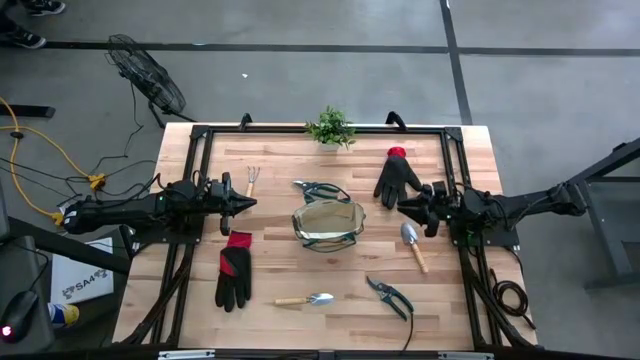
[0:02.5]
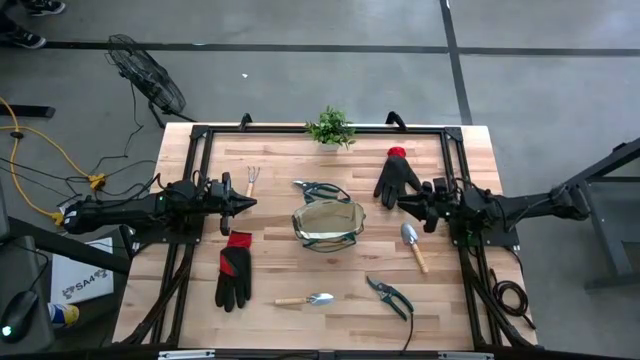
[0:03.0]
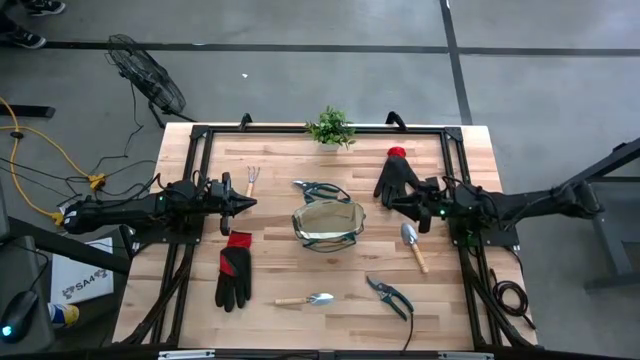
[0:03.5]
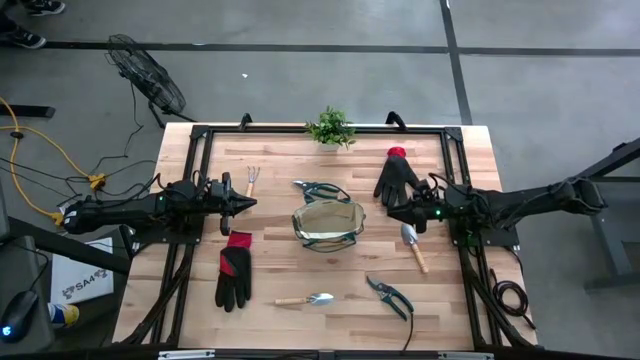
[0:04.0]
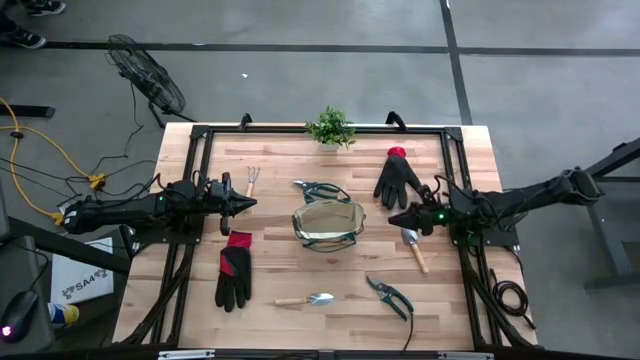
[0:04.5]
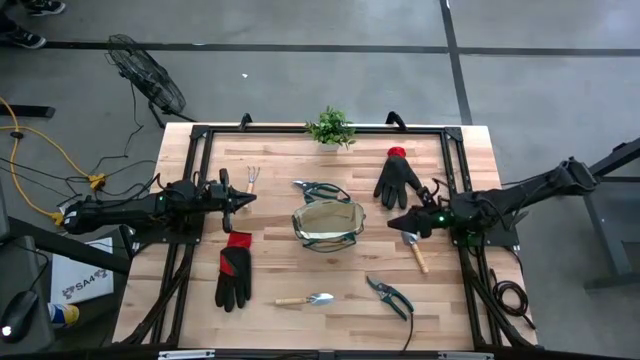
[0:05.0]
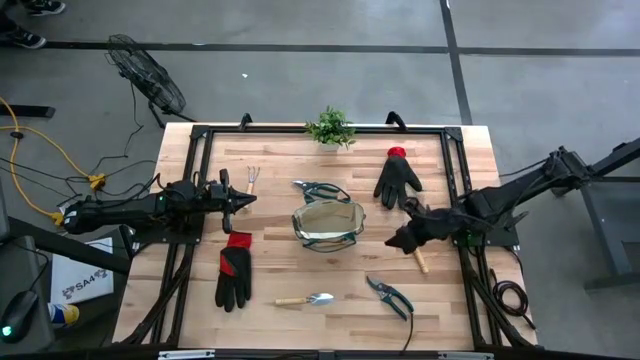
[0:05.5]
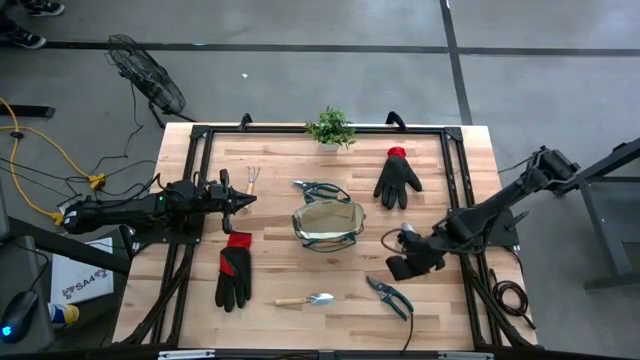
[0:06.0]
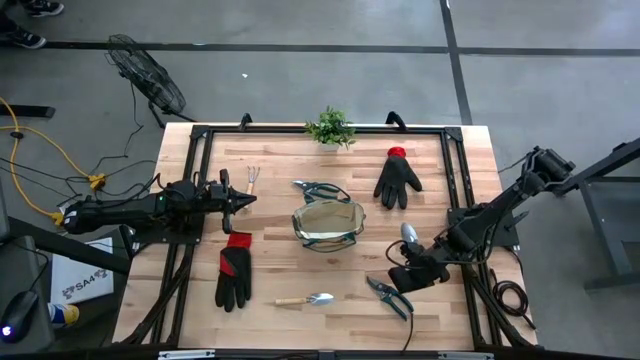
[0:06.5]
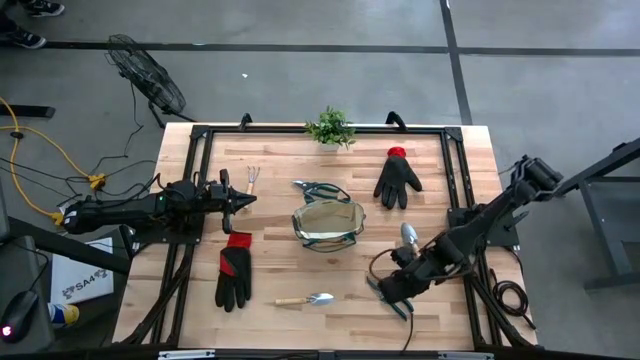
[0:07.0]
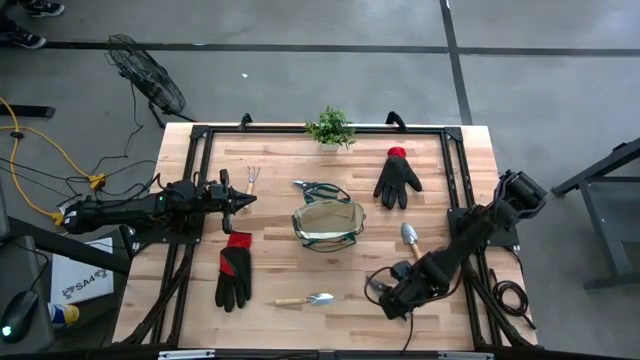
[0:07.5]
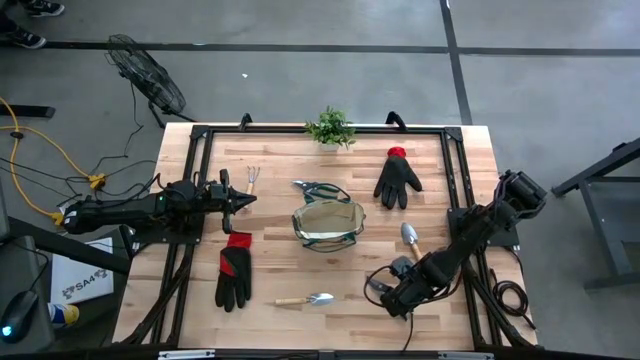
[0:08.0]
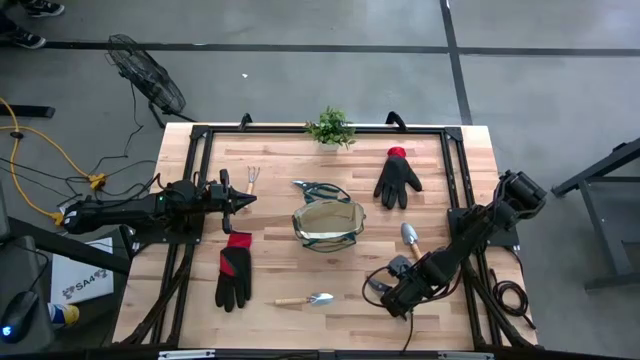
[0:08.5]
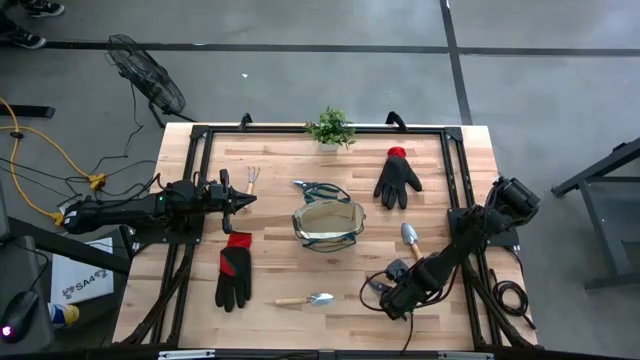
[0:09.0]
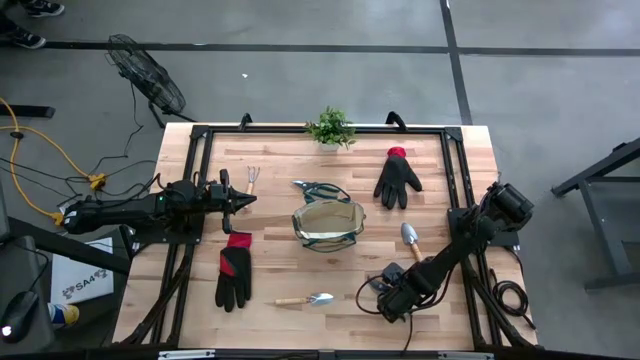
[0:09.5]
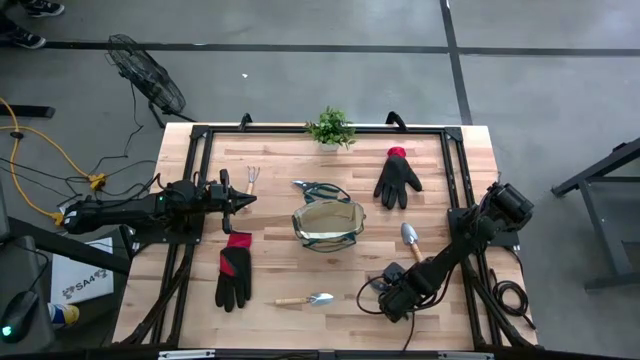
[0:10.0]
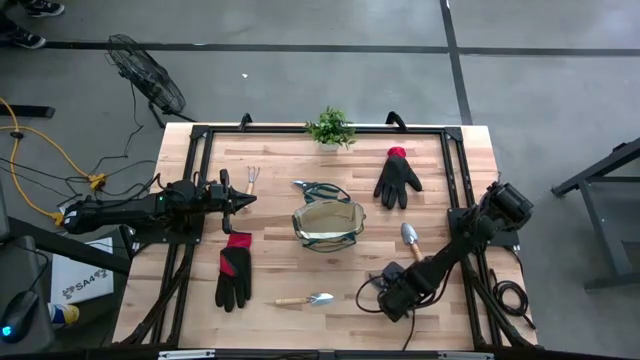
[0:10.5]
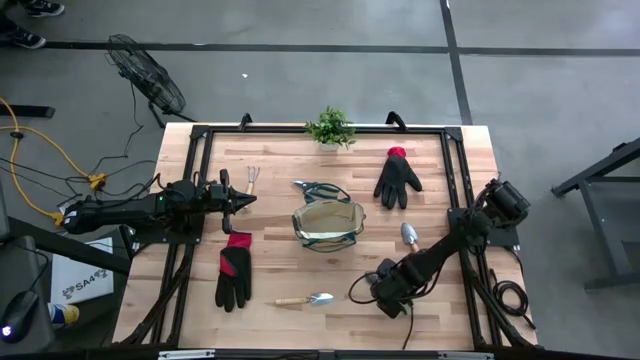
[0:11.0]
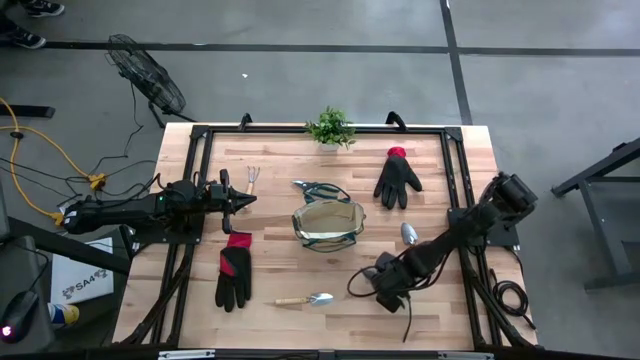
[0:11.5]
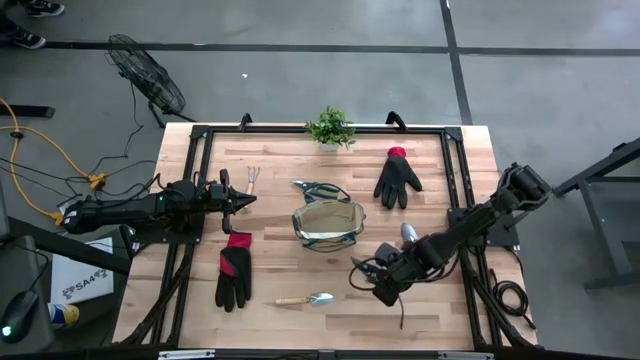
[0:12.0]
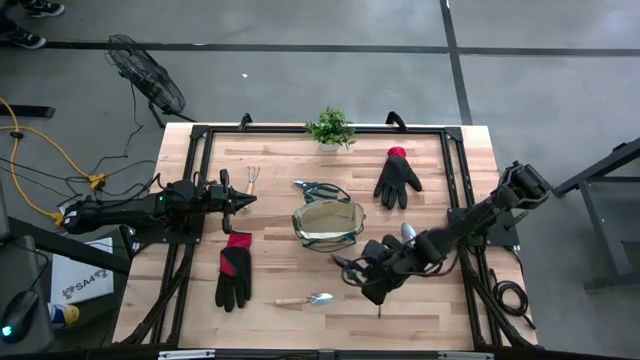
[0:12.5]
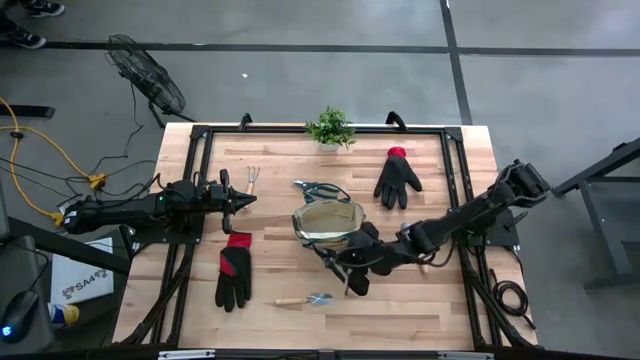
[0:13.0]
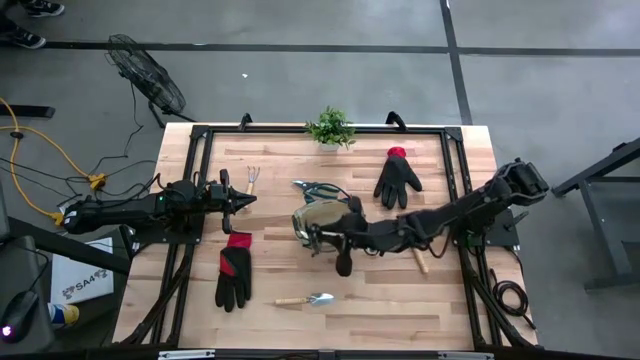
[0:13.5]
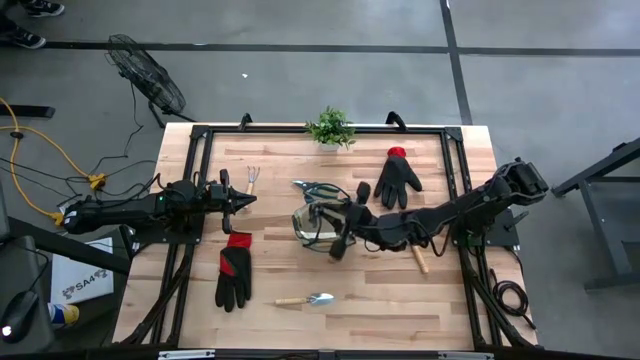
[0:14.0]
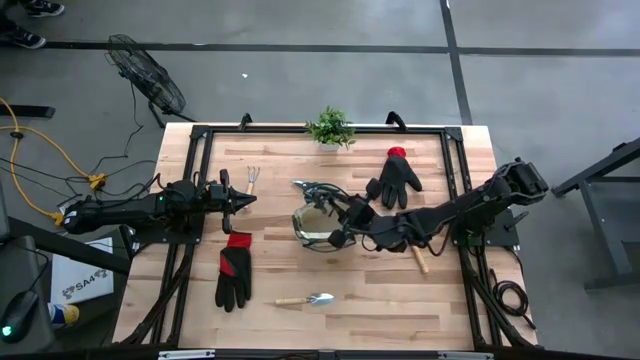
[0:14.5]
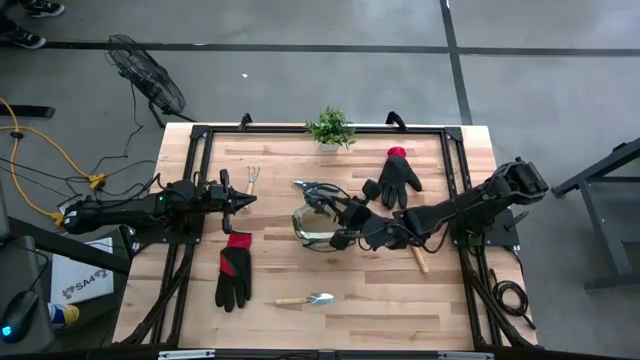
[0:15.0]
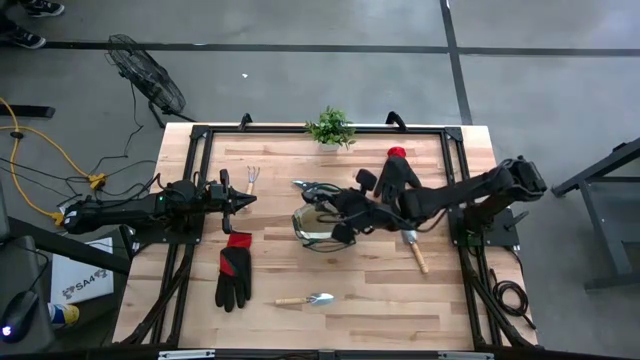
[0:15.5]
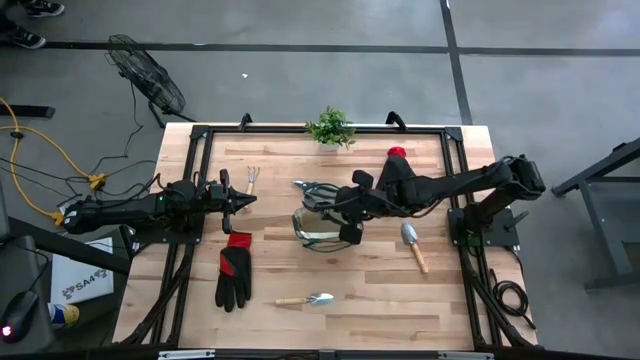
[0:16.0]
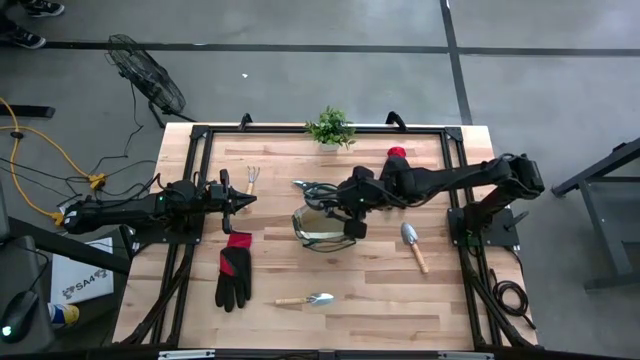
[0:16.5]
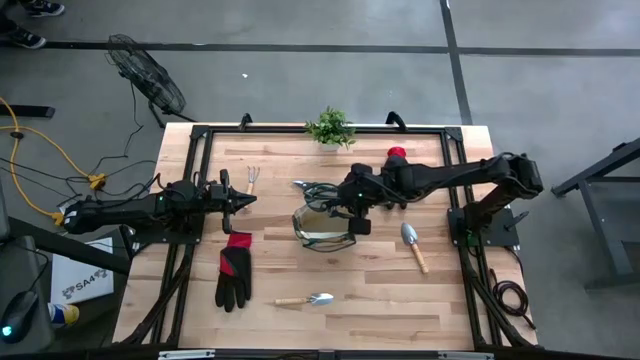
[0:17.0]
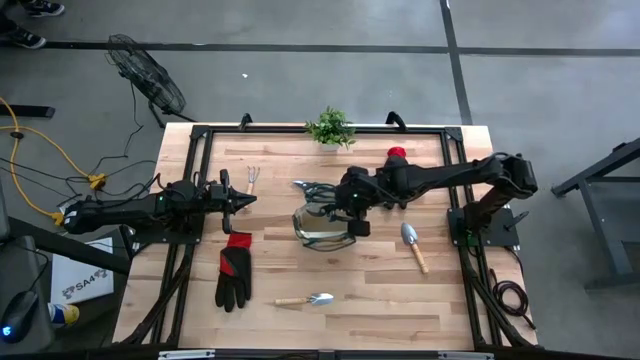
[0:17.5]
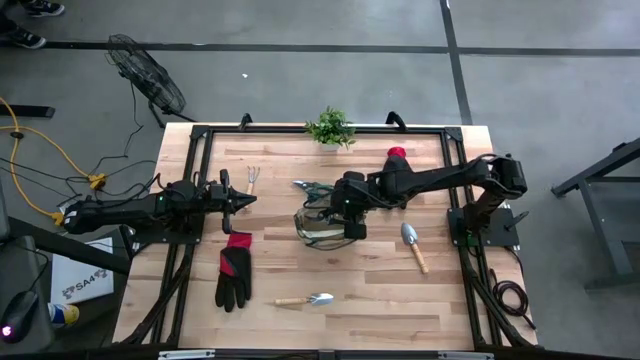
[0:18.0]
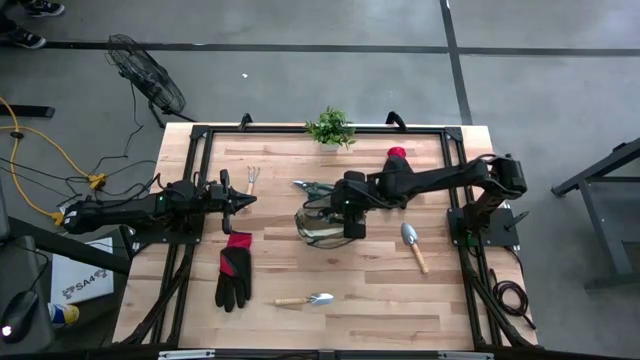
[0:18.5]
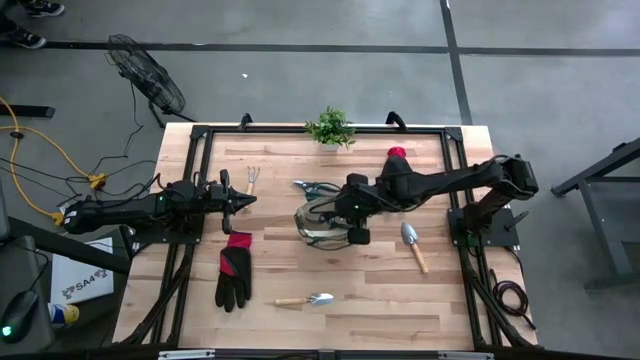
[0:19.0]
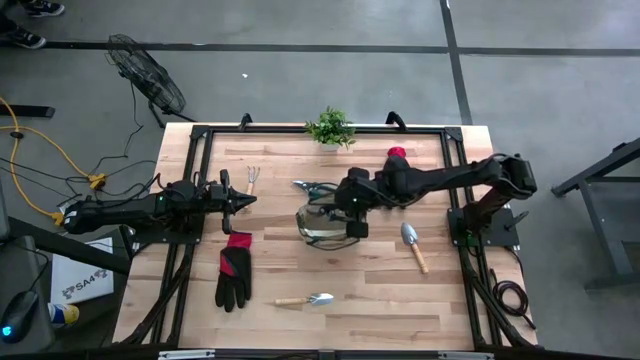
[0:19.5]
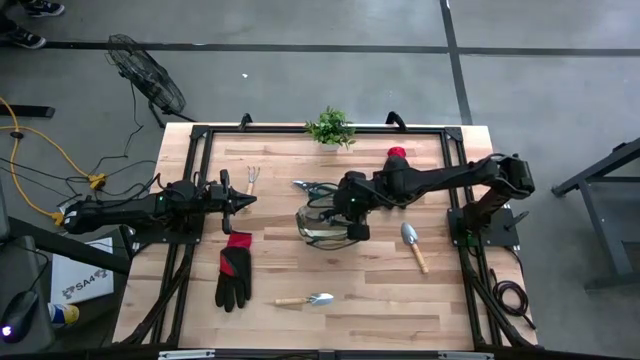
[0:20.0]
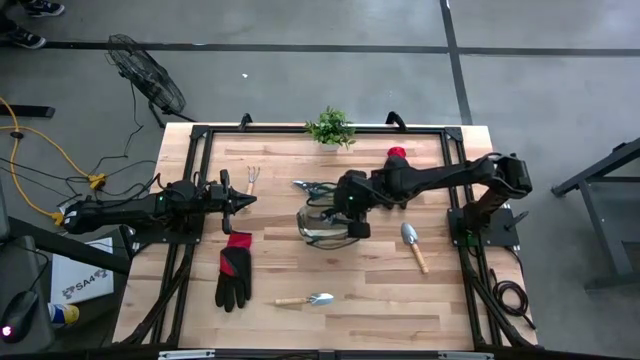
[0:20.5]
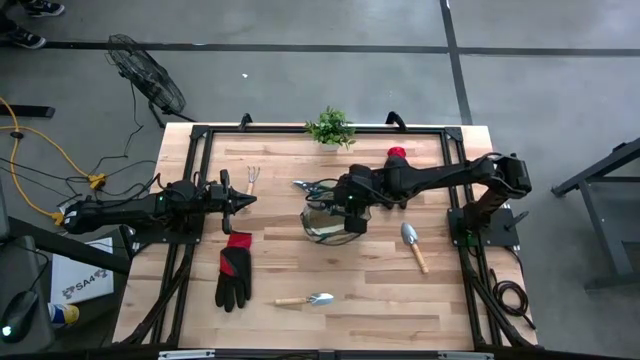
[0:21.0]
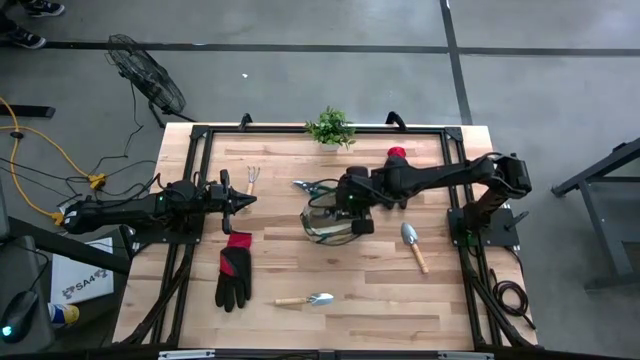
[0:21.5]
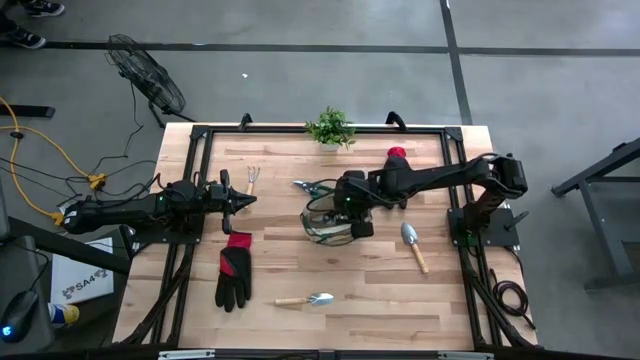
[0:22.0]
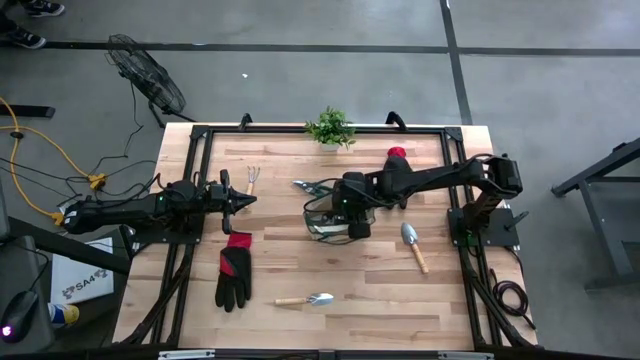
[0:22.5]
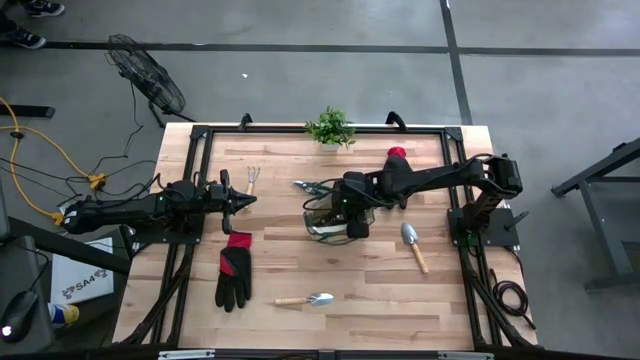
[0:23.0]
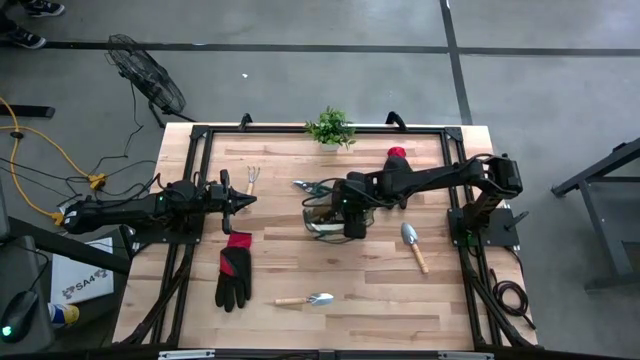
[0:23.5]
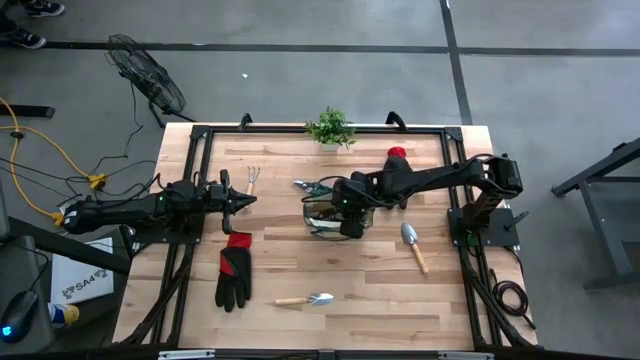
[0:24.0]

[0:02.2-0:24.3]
Task: Pick & Place Garden tools in Gardening bag
Put the green shear scissors into the gardening bag
